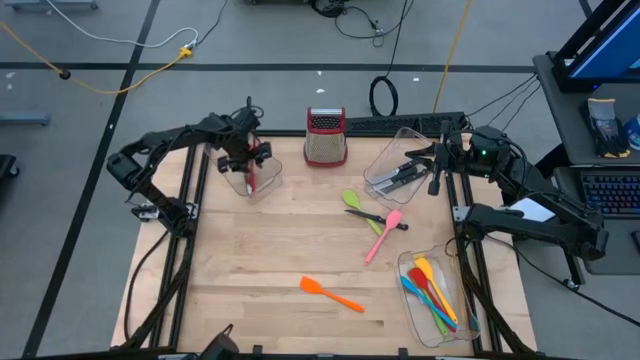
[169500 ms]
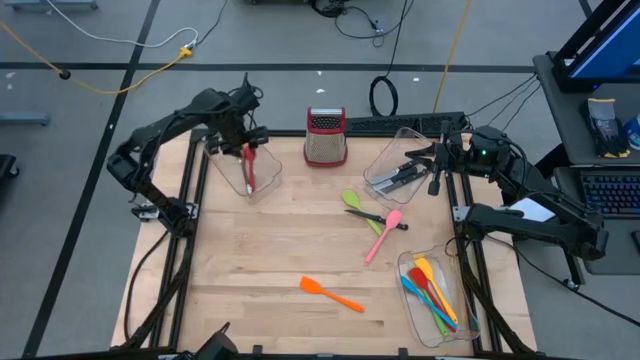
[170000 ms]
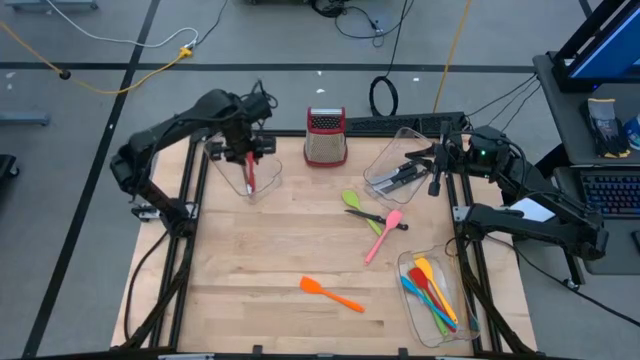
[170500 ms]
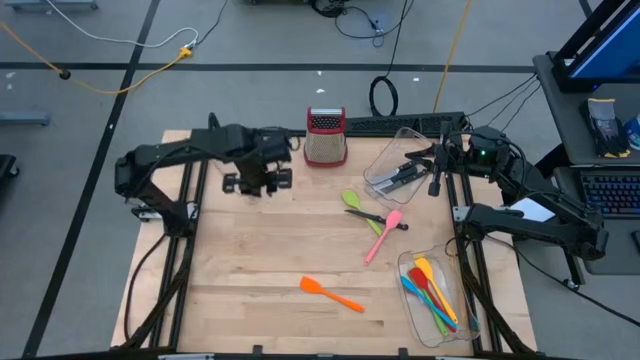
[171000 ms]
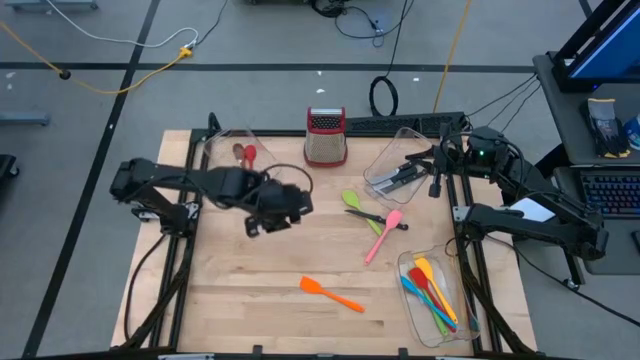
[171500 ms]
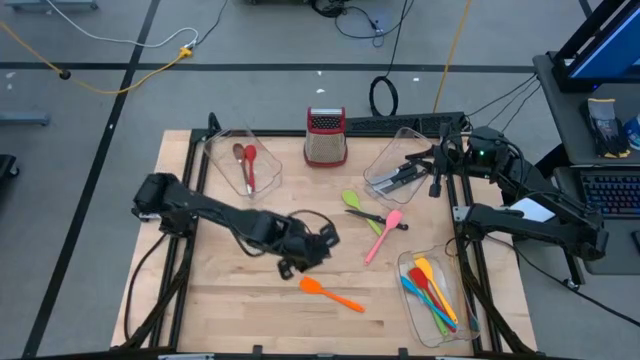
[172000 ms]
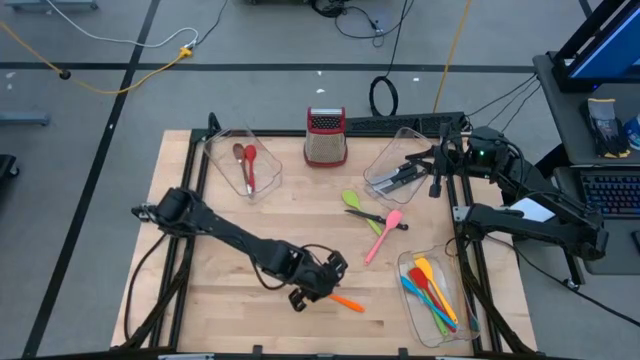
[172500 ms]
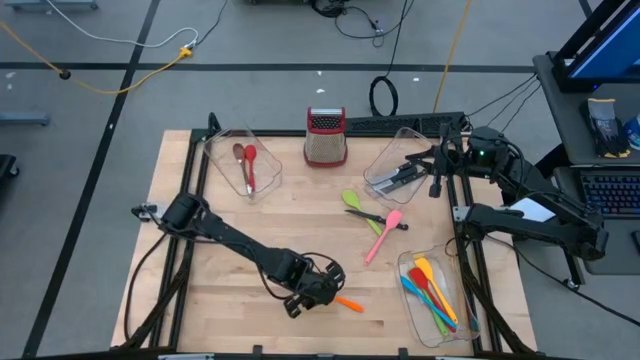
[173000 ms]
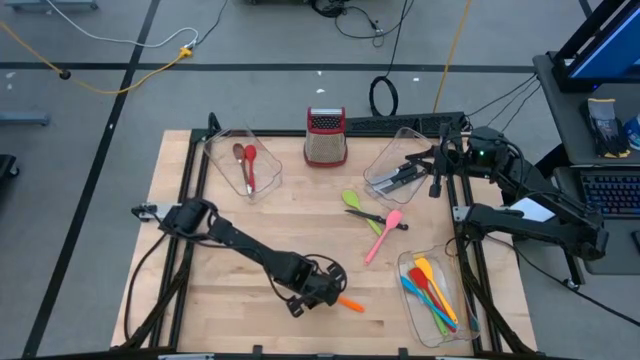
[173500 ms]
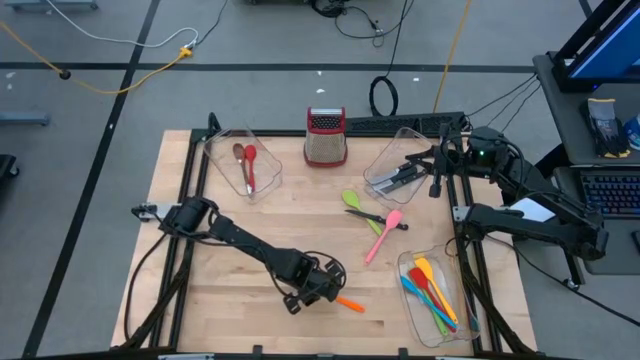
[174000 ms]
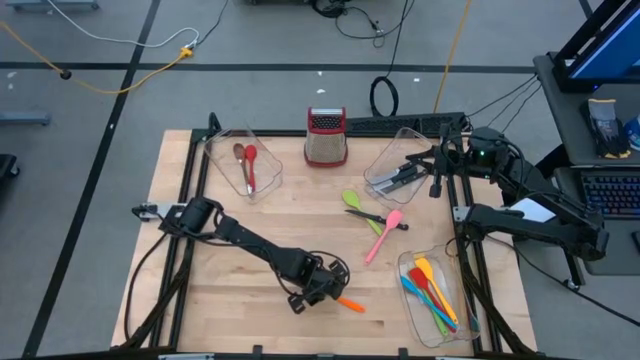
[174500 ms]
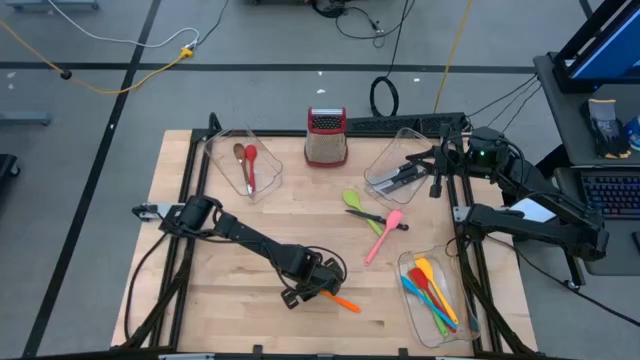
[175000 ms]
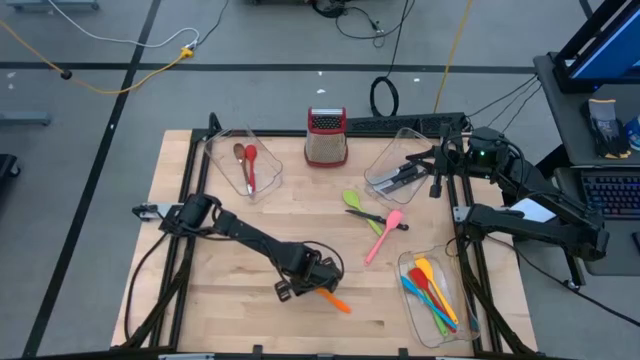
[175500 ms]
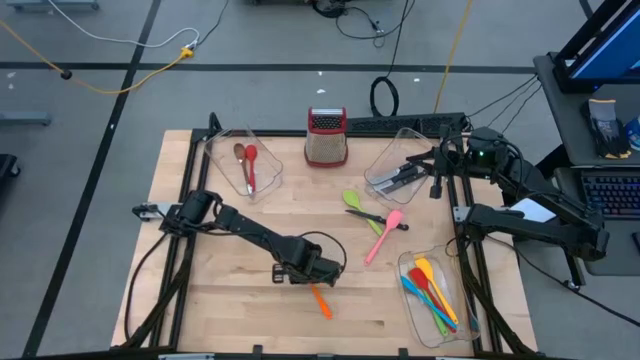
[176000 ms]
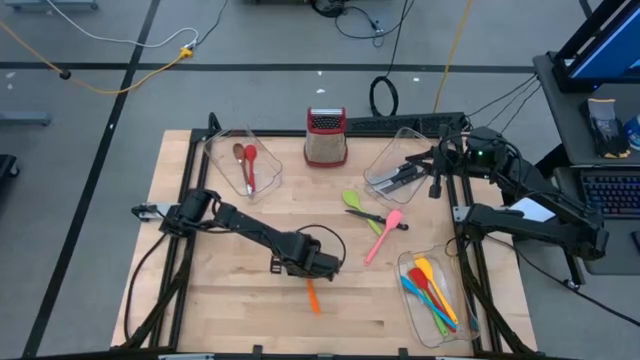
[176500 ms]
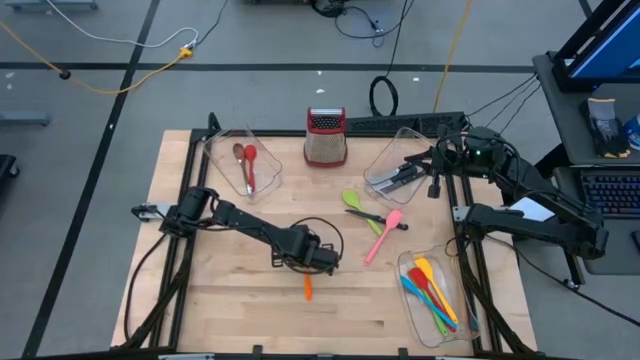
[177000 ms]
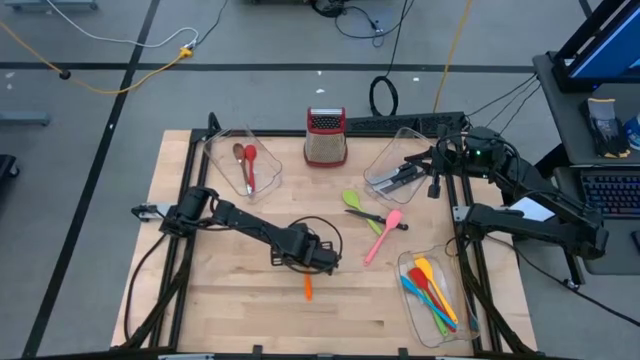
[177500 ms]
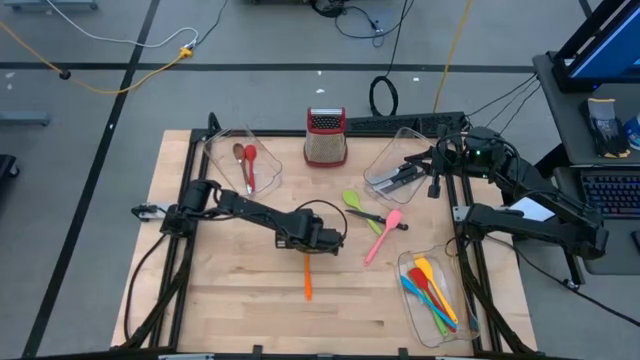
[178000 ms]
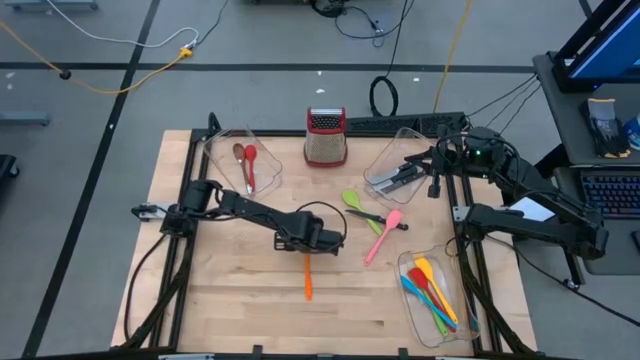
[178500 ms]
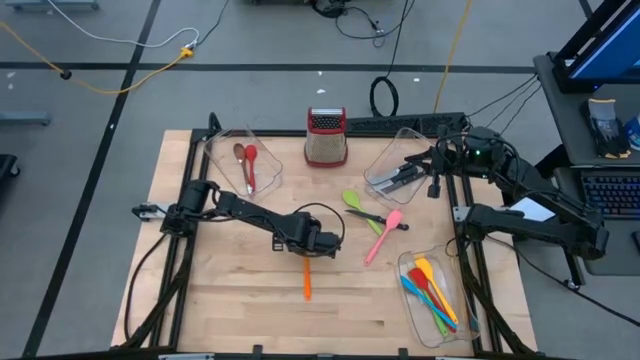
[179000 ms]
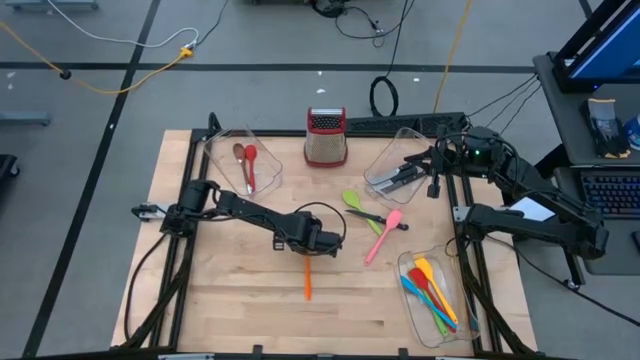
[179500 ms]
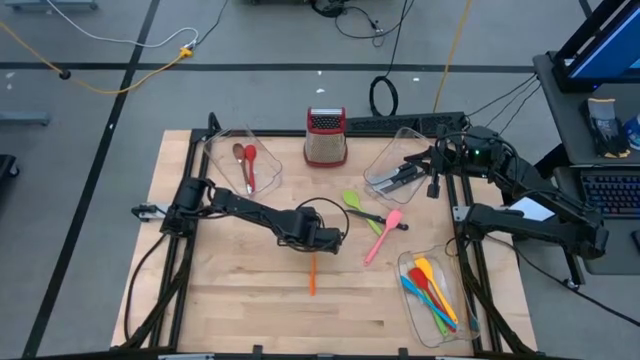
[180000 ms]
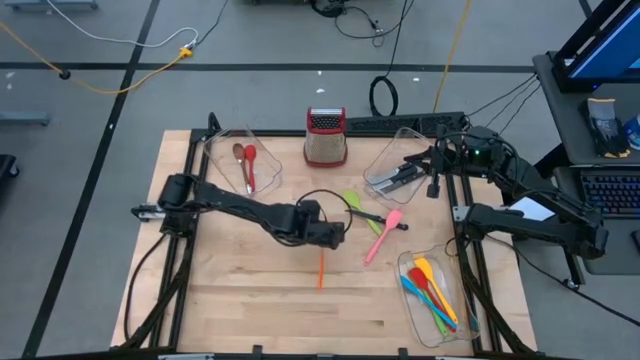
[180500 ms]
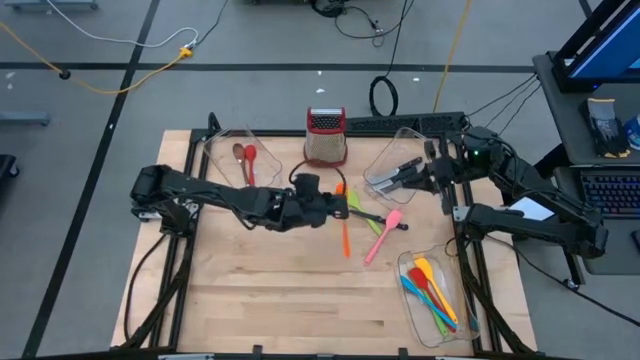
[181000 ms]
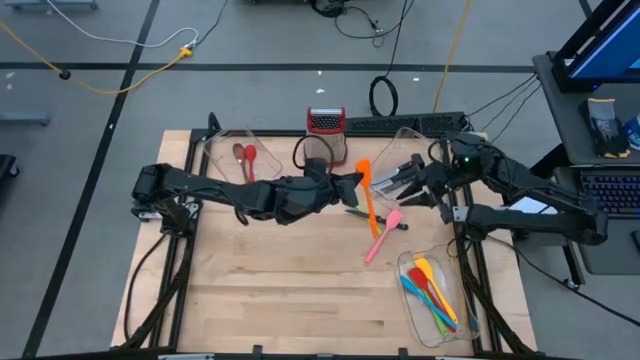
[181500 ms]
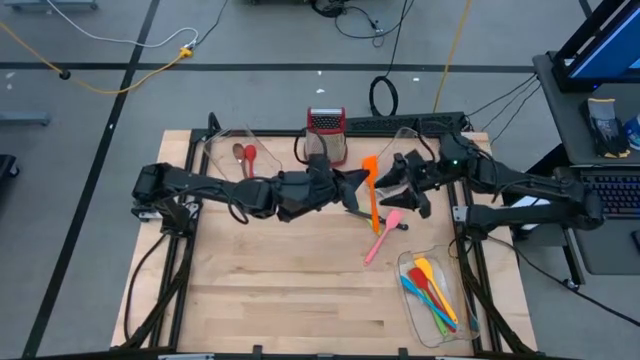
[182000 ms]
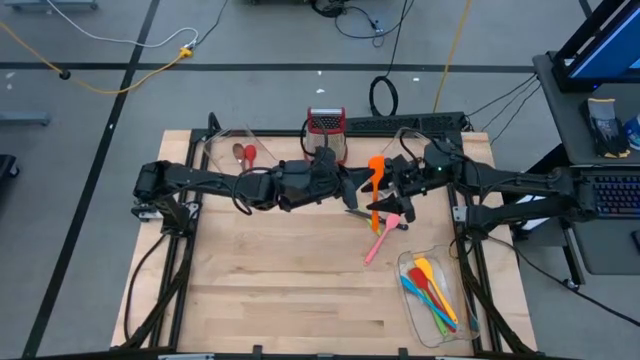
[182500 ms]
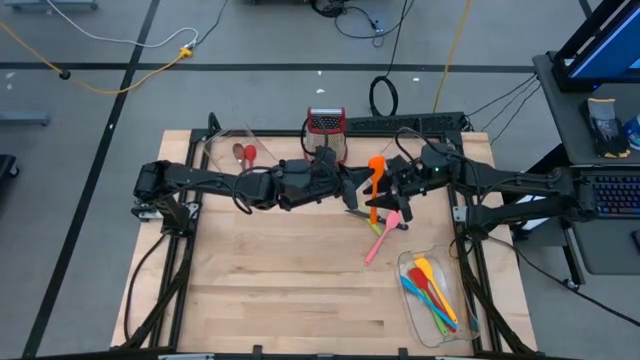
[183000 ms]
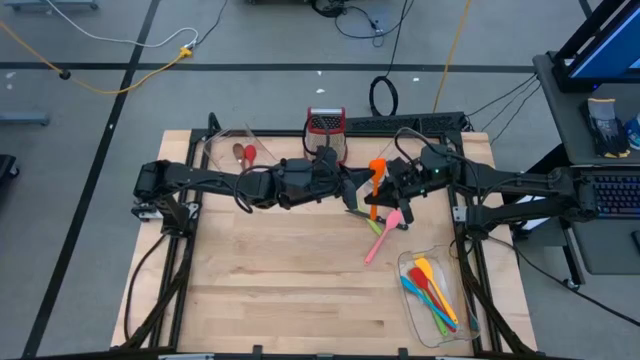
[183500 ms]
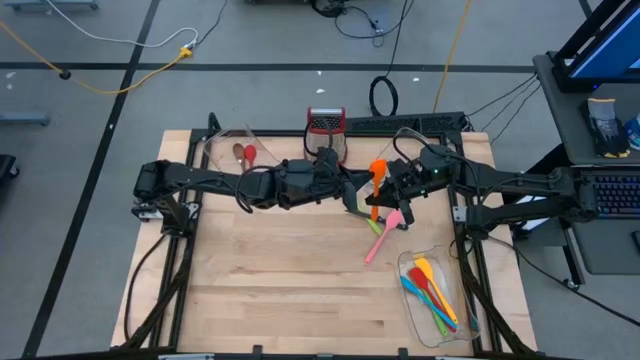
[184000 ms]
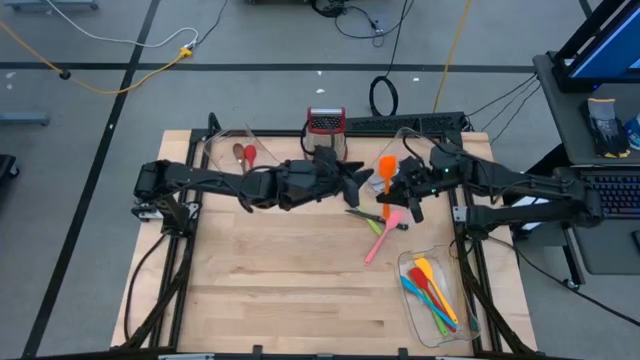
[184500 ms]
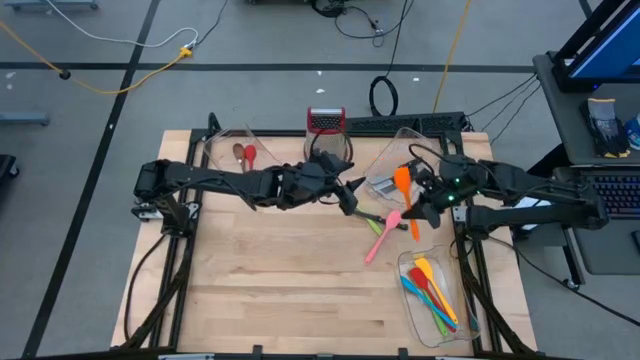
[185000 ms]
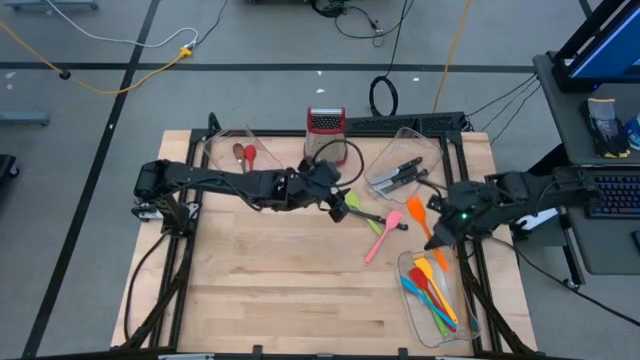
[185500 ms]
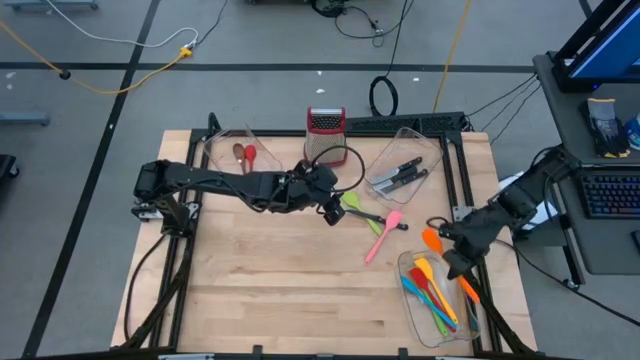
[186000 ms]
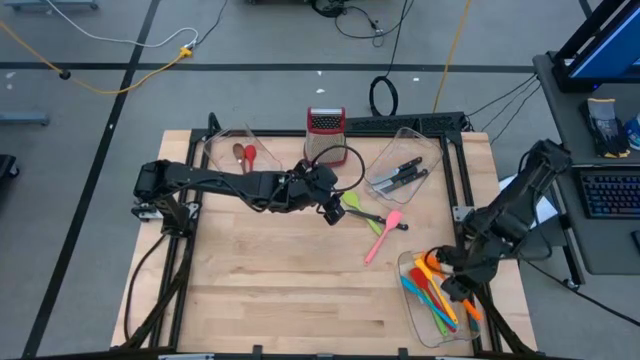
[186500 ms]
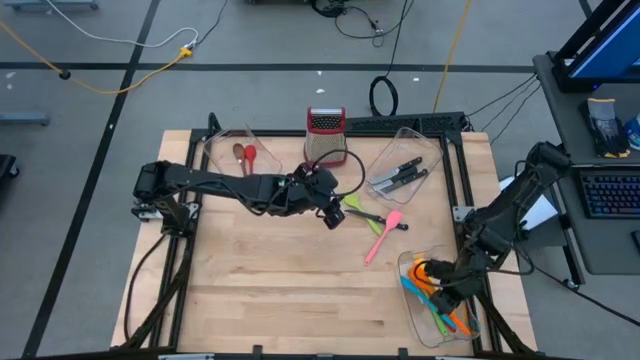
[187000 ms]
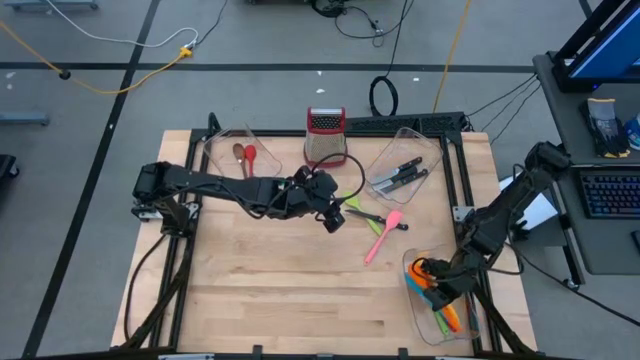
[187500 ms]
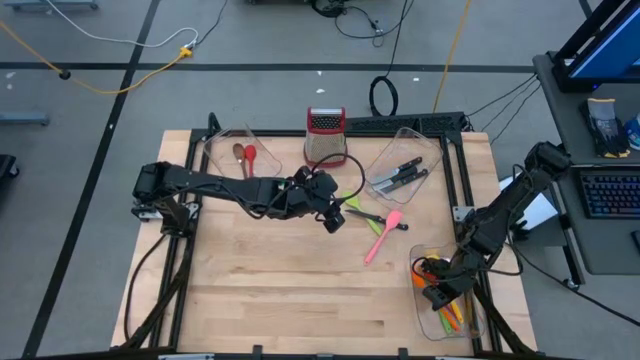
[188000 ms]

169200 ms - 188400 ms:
Task: Pick & Place Kitchen Items
Put the orange spatula into the bottom transparent bin

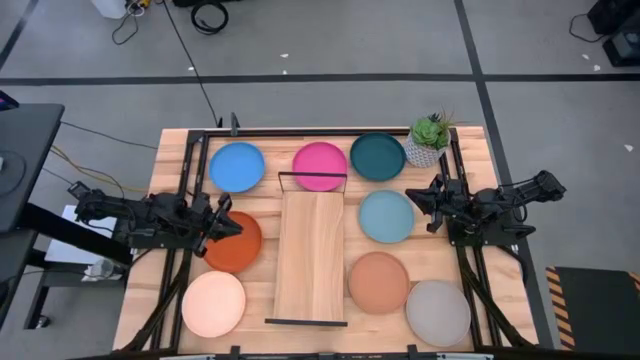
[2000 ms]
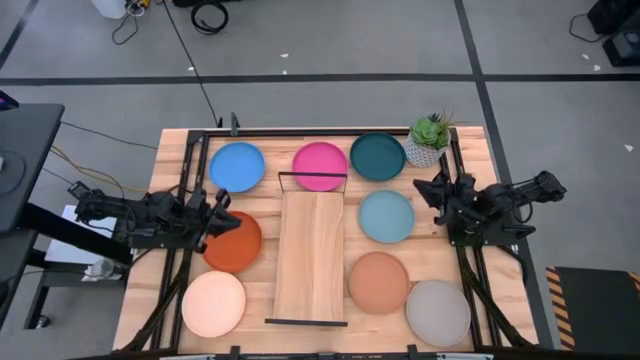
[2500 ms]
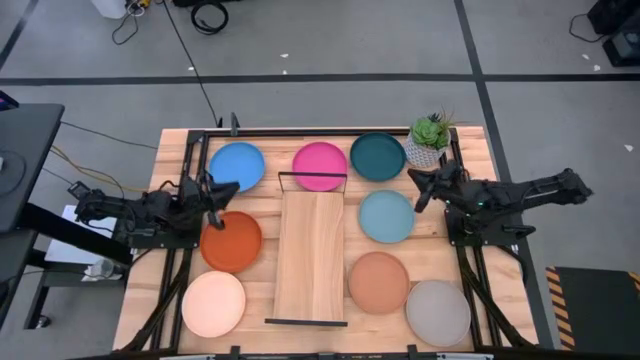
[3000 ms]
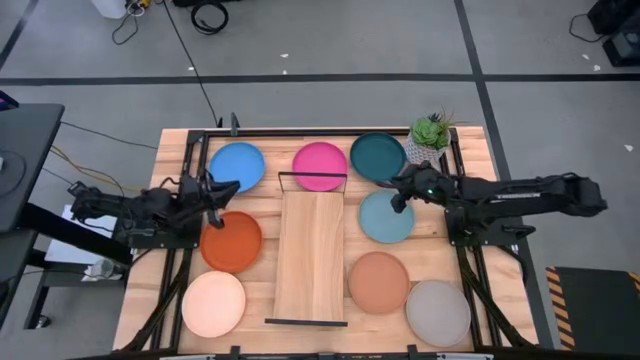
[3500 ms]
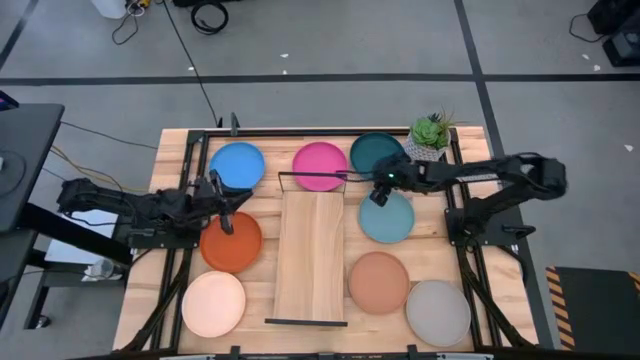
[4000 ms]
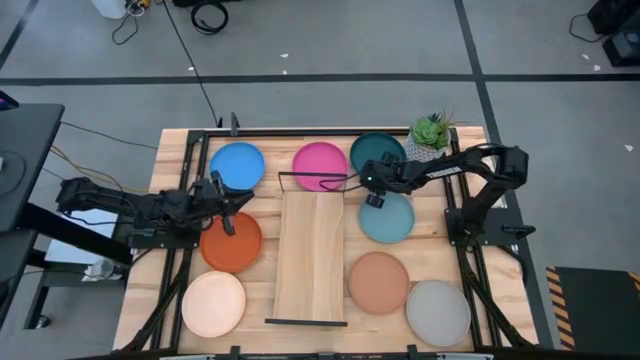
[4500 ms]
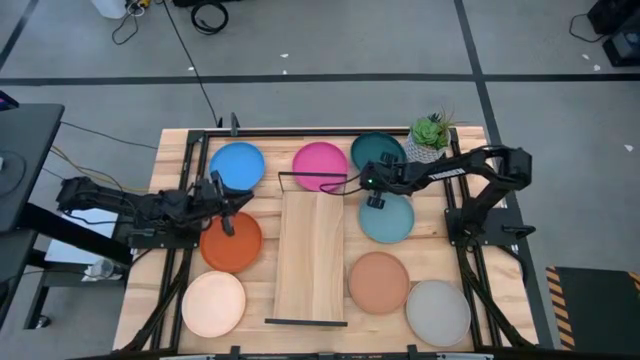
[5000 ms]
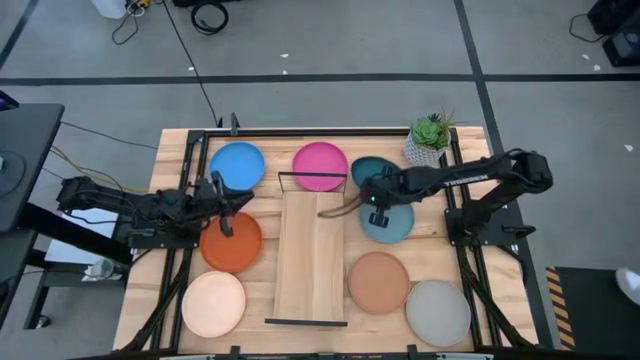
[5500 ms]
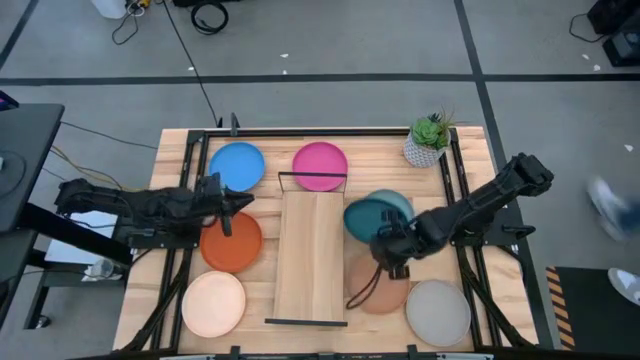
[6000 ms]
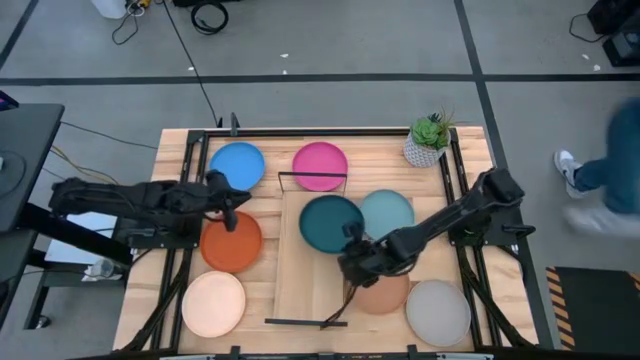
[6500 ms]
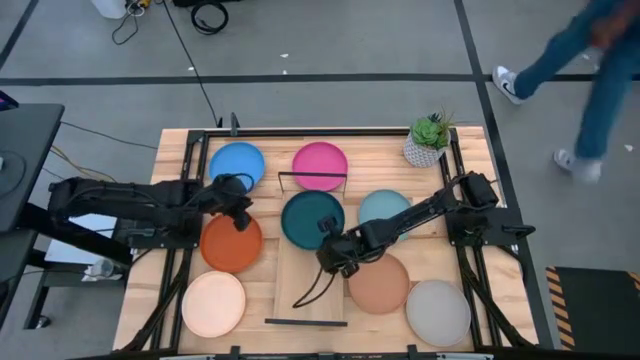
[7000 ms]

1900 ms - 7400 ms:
Task: Place and stack plates onto a shelf
Put the green plate on the shelf
